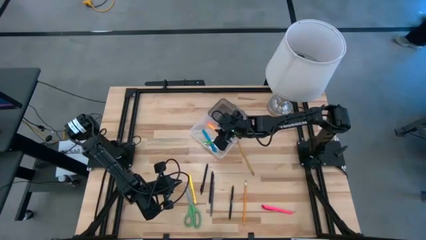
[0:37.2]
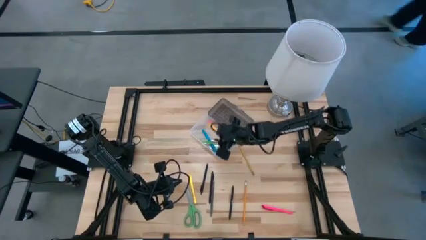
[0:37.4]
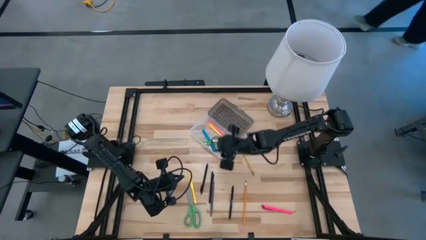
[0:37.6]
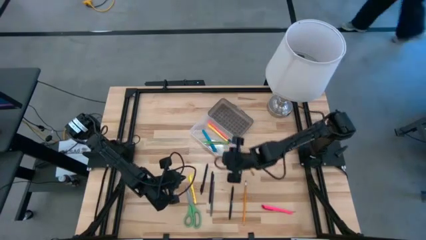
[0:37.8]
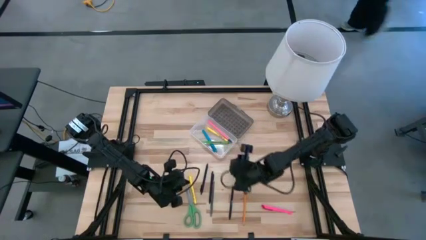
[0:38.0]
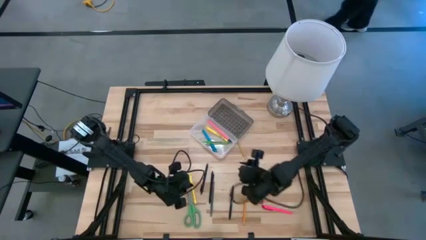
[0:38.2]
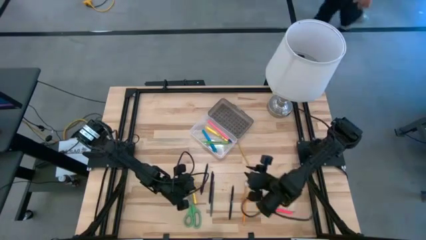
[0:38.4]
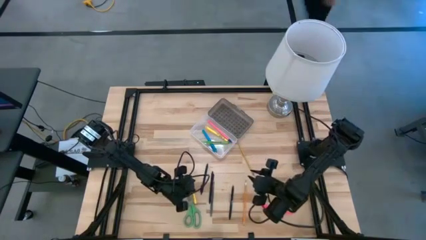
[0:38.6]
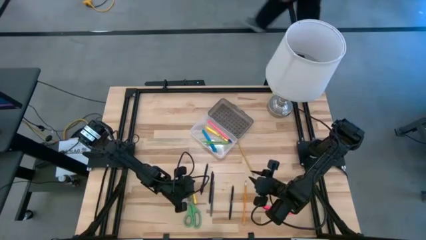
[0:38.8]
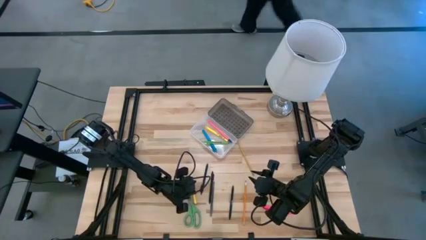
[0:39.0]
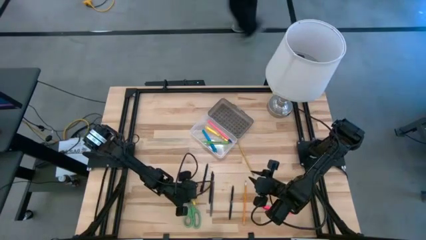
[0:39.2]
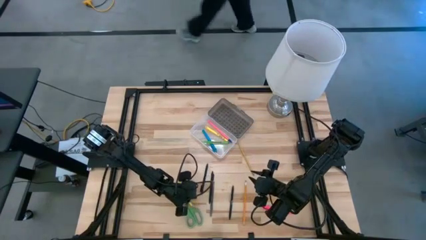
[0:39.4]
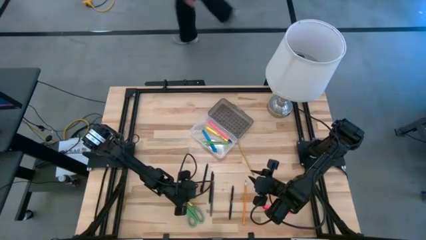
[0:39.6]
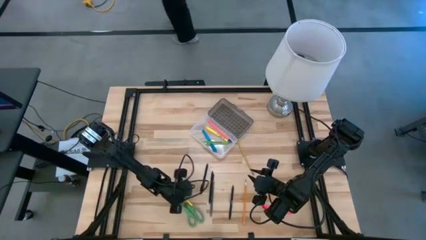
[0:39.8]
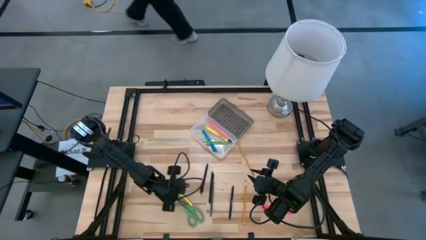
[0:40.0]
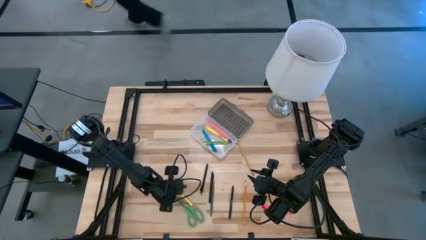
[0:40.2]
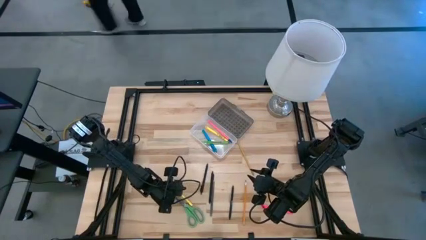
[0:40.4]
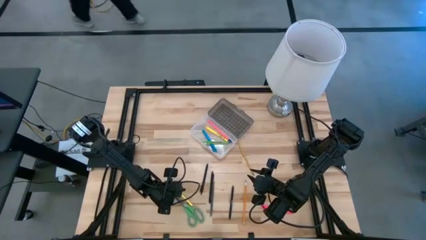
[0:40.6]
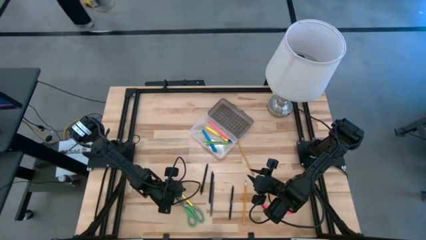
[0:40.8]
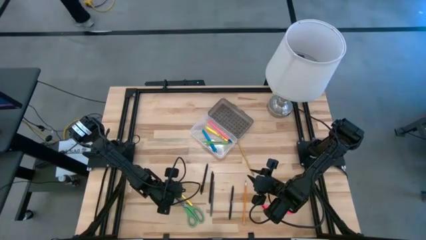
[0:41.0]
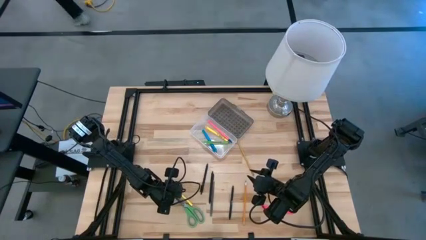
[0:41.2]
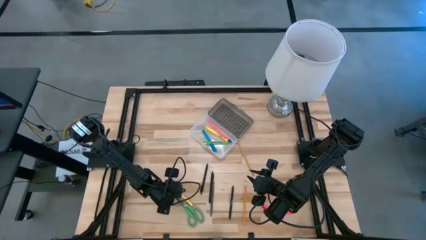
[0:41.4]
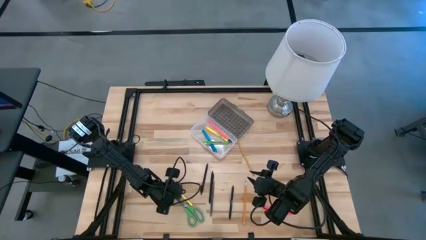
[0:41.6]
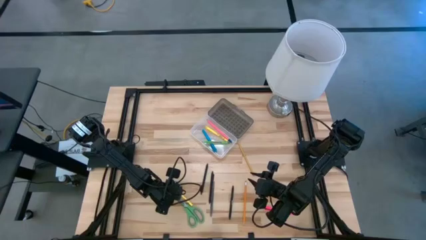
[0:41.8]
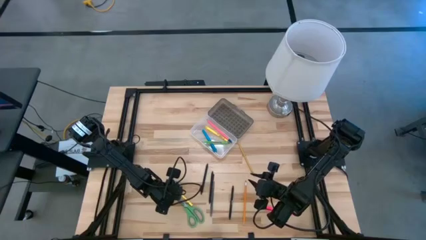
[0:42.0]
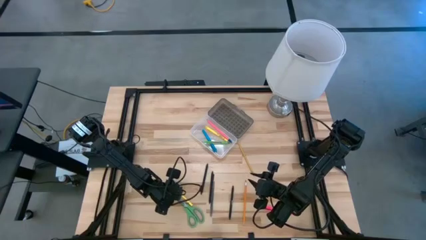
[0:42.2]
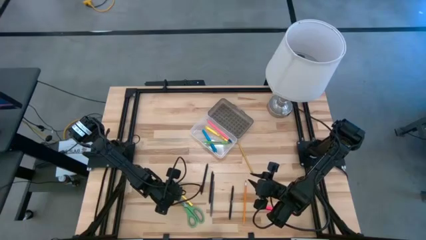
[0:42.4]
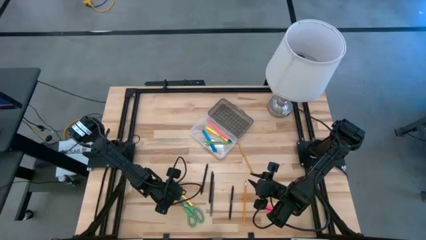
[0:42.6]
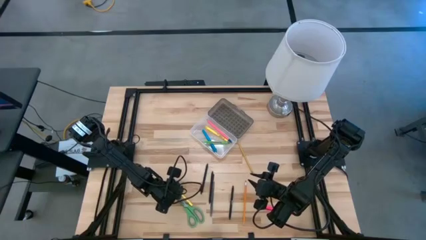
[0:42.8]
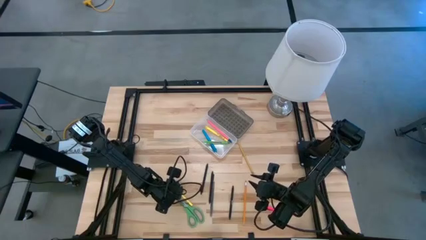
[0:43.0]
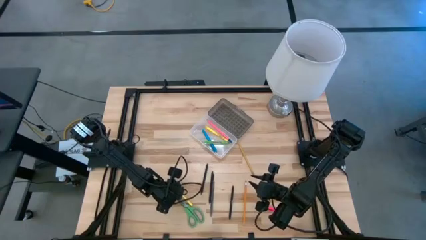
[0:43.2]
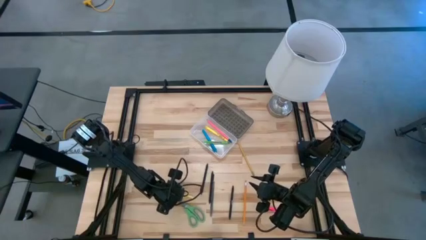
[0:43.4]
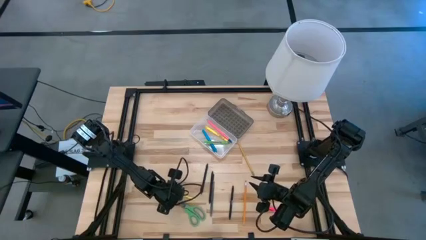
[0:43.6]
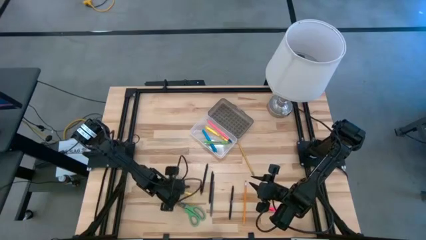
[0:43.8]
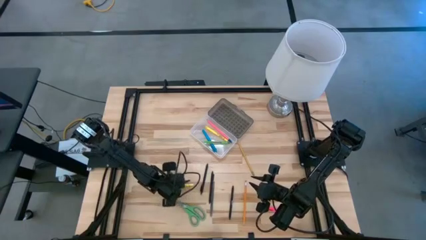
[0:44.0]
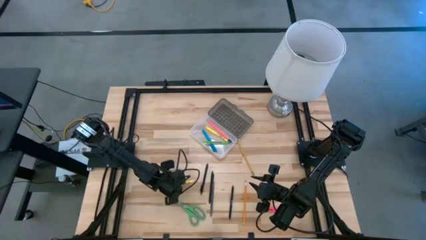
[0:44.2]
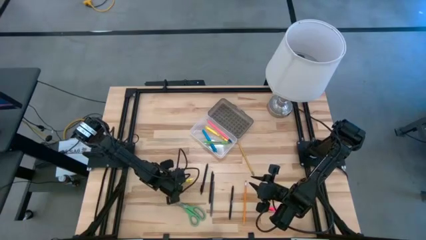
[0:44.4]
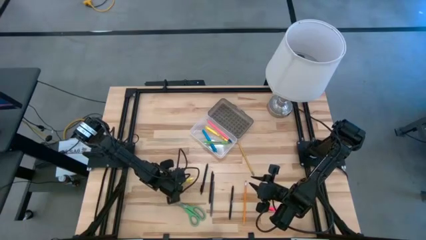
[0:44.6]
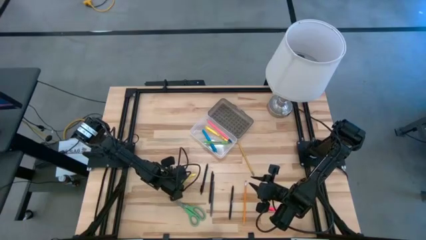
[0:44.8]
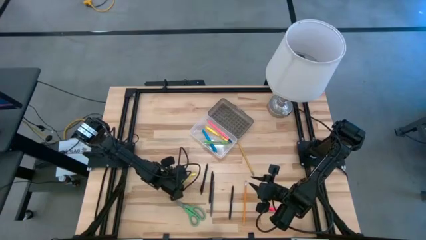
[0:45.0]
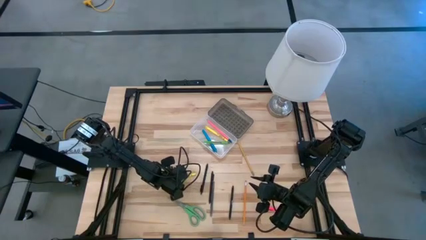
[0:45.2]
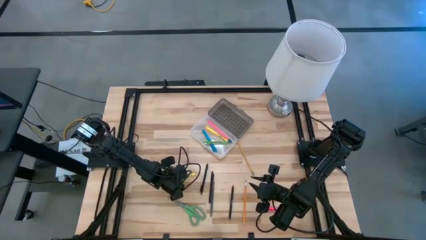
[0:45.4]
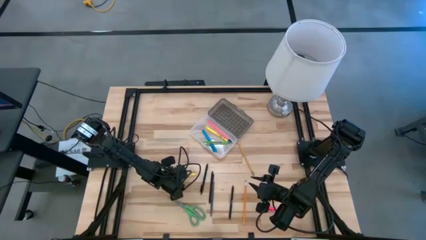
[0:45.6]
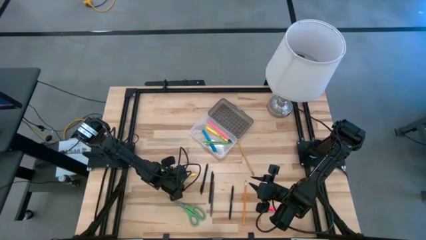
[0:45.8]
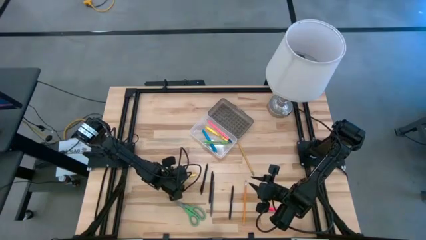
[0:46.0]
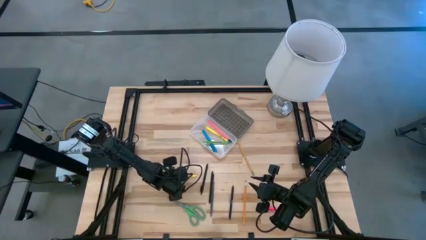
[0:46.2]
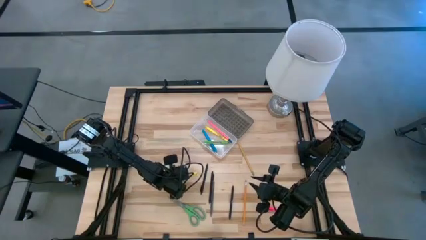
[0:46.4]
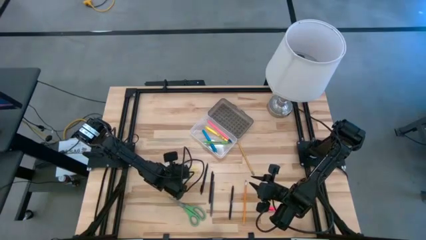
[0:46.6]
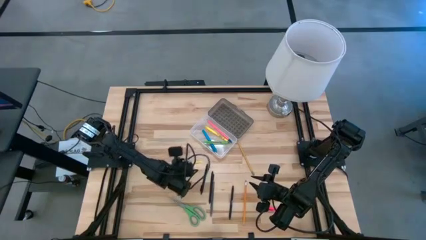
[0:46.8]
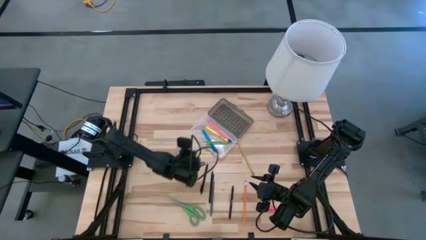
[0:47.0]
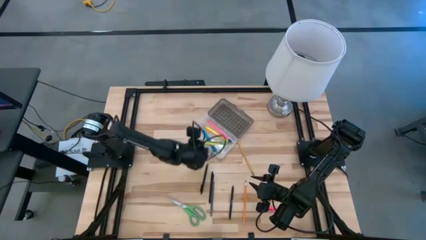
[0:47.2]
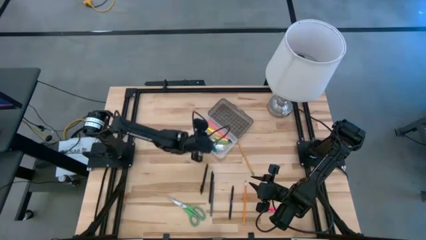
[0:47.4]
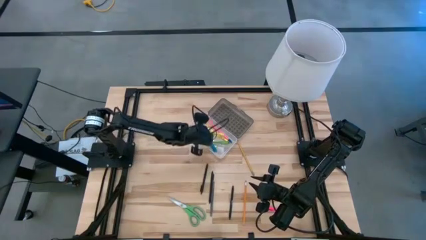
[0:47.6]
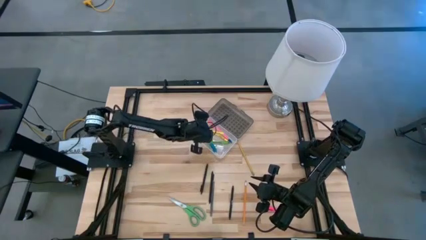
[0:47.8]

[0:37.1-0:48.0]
Task: Pick & place school supplies into a supply box
Put the yellow pen into the black supply box

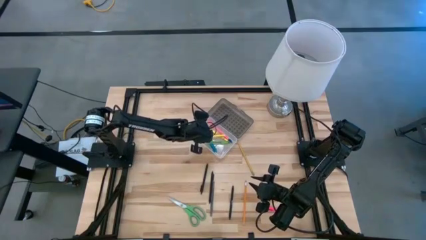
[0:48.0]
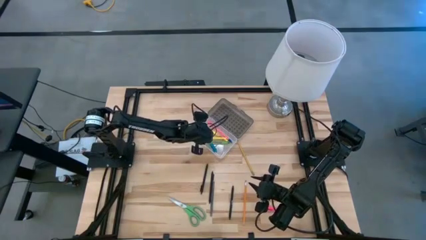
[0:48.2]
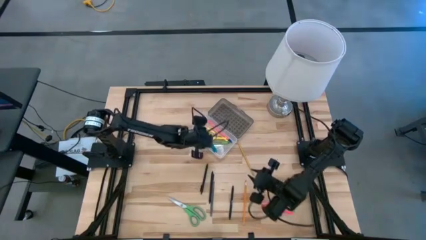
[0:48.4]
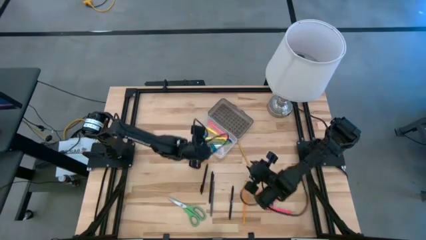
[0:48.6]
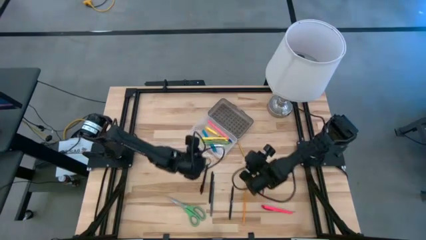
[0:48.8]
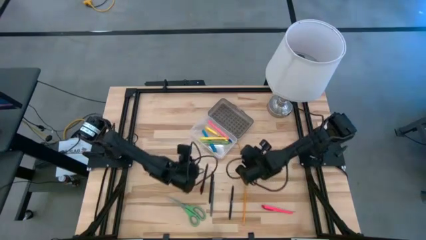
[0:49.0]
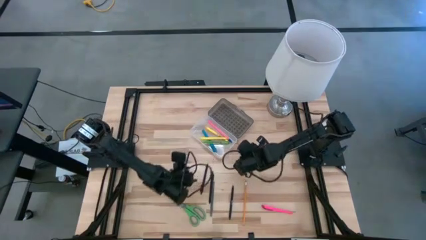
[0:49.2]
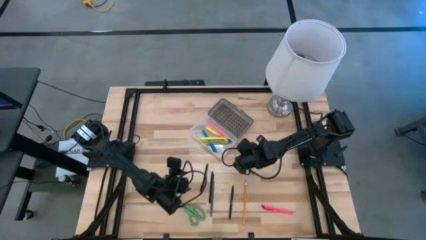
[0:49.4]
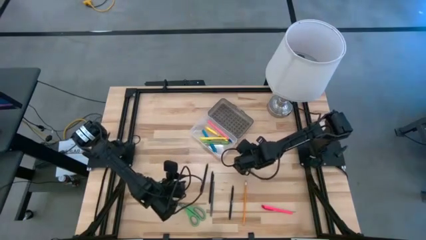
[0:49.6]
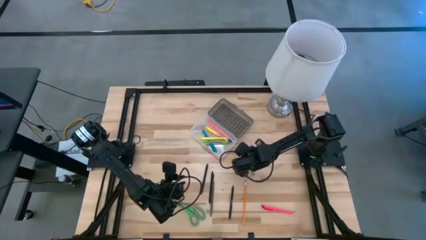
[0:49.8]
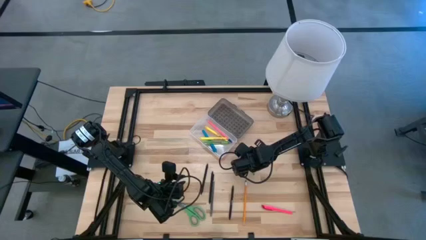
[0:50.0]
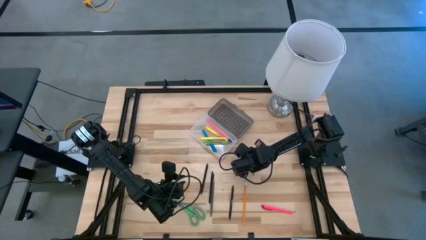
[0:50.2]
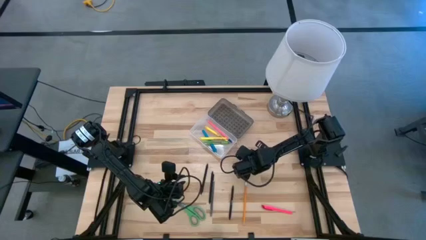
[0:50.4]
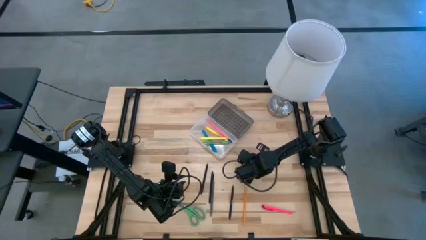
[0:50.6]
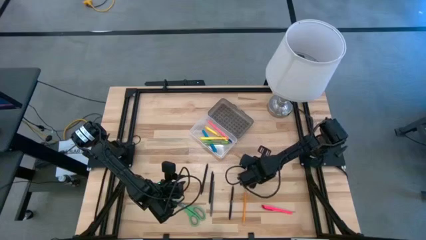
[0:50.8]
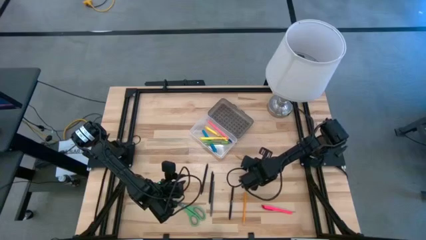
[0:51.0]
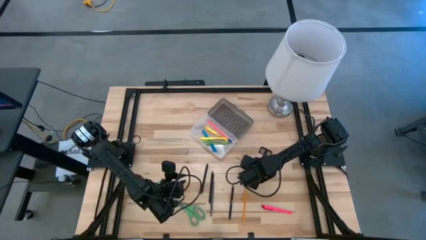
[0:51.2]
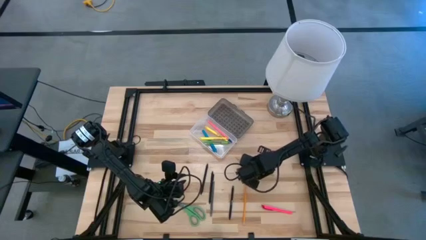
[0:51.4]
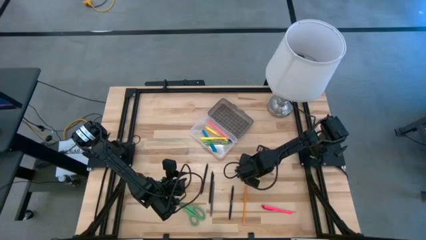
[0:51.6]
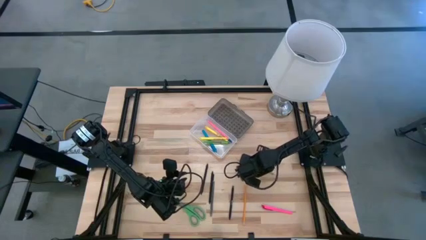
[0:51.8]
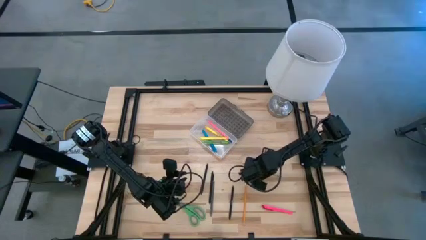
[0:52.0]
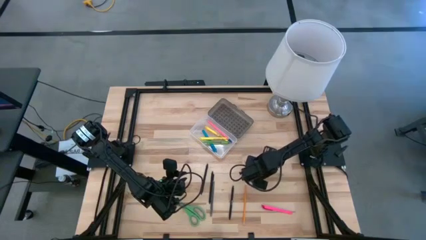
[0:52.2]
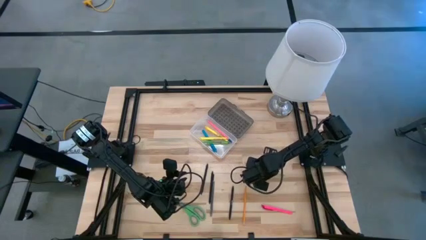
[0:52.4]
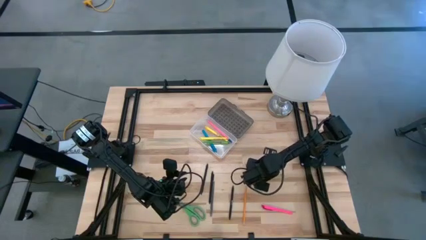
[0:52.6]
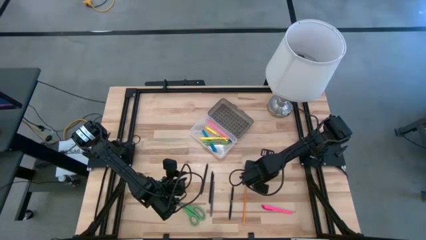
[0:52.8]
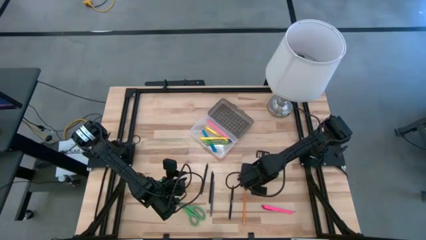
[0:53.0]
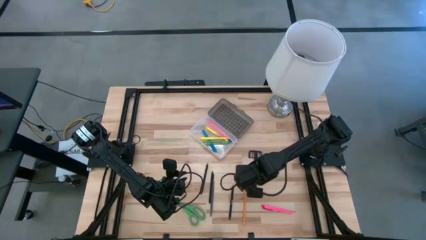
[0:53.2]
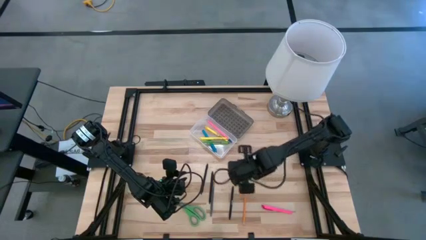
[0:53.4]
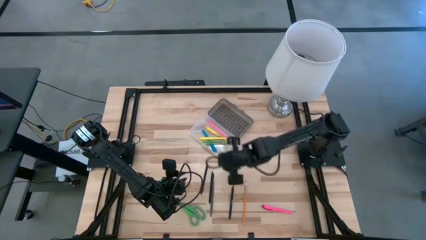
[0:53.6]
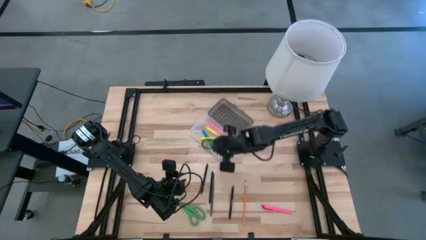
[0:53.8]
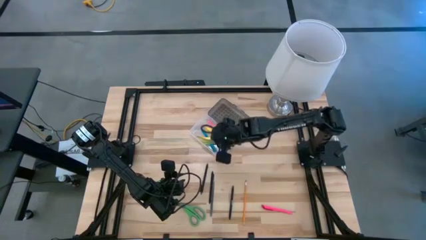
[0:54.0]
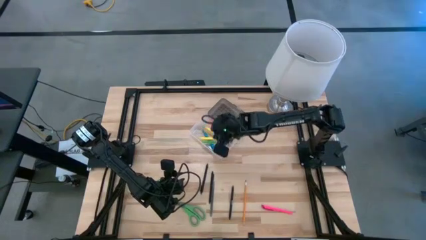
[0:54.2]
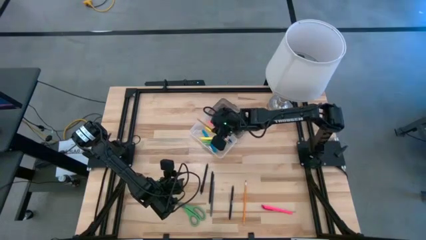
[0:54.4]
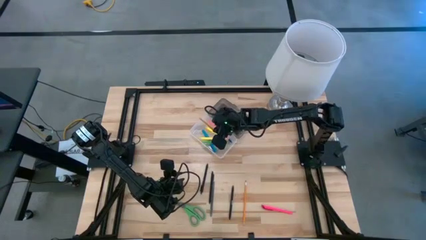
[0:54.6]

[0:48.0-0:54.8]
Put the yellow pencil into the black supply box
